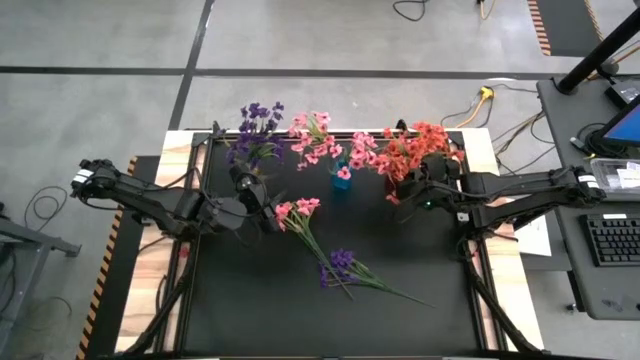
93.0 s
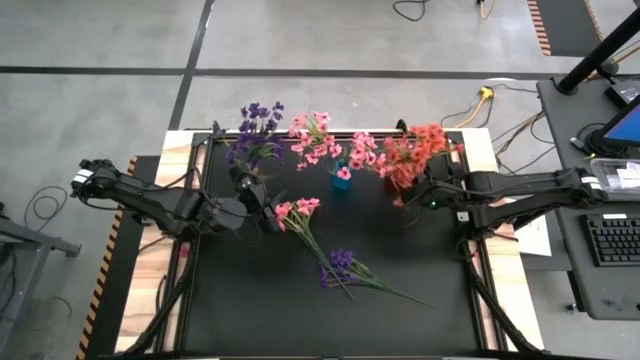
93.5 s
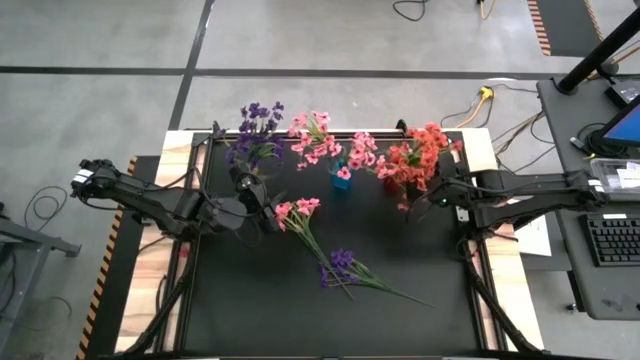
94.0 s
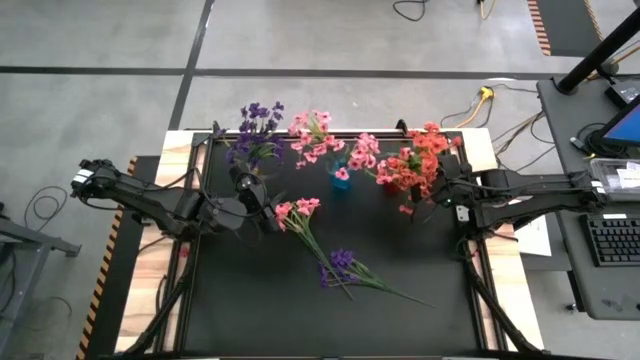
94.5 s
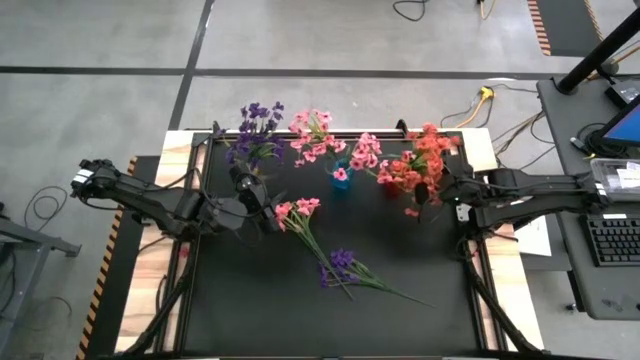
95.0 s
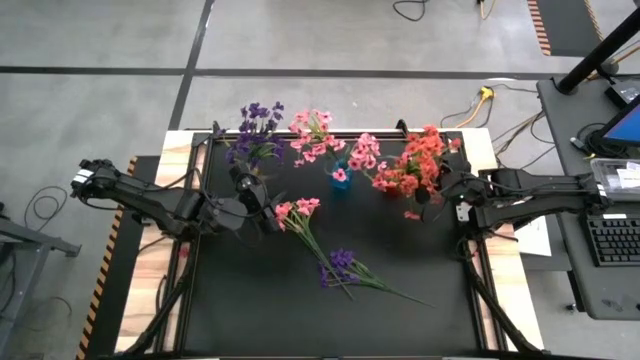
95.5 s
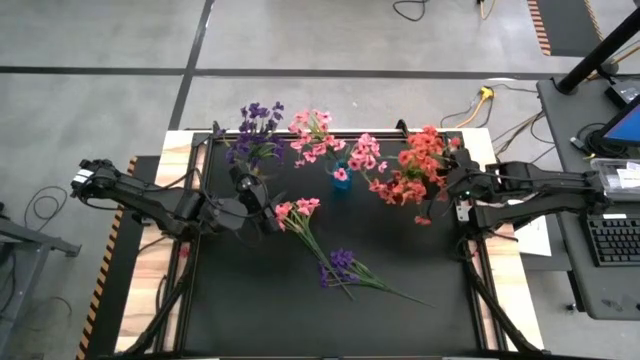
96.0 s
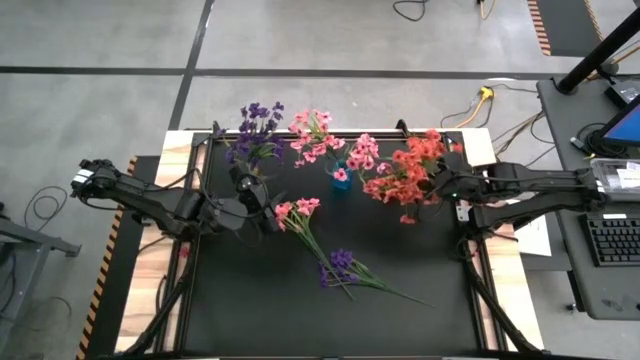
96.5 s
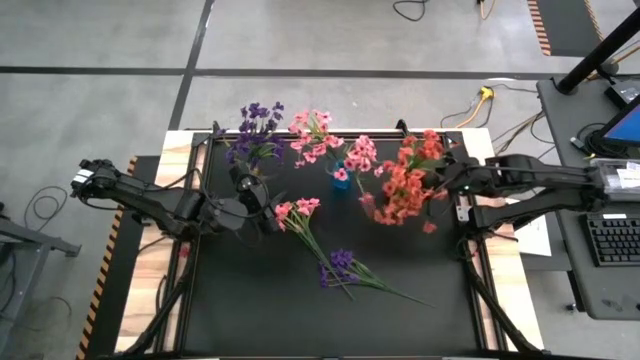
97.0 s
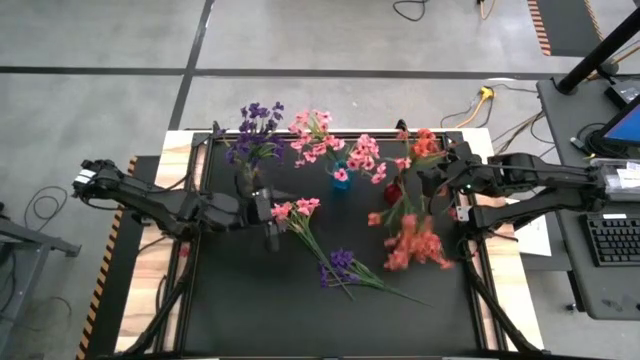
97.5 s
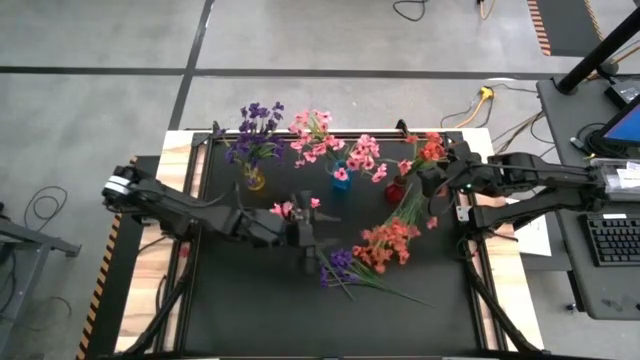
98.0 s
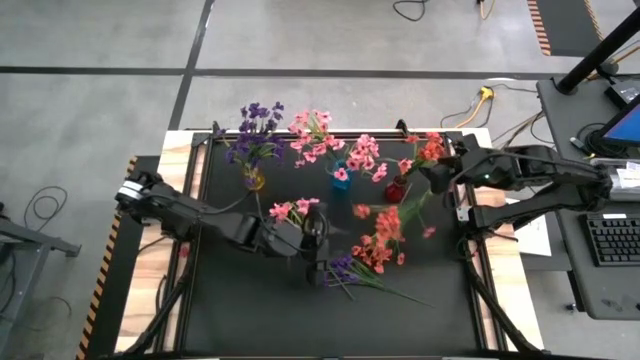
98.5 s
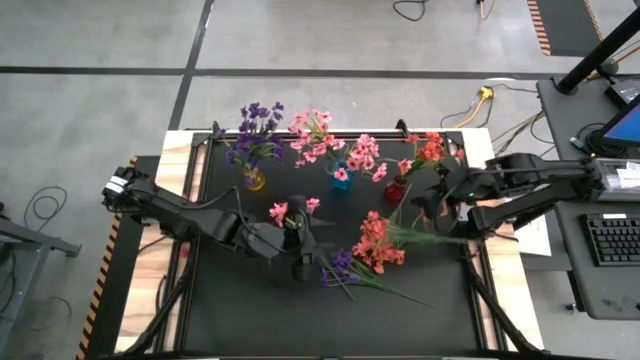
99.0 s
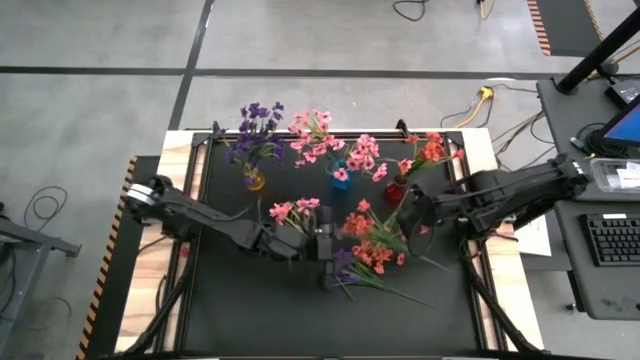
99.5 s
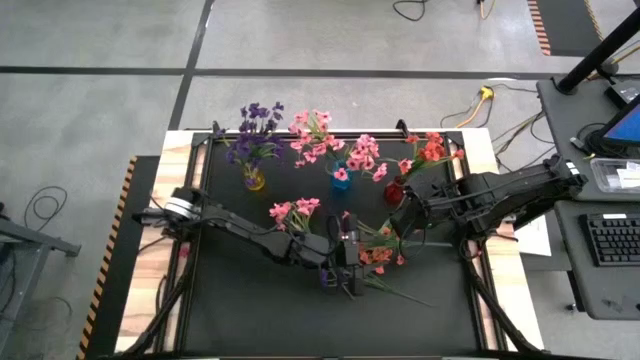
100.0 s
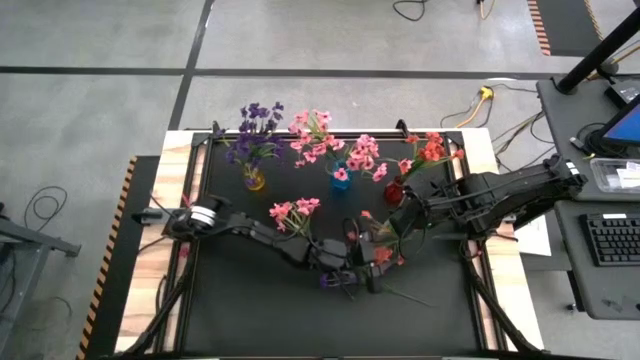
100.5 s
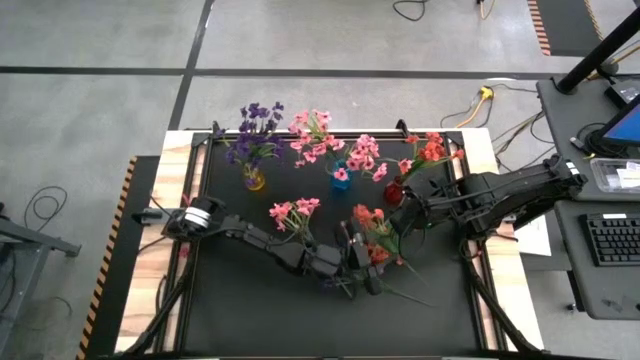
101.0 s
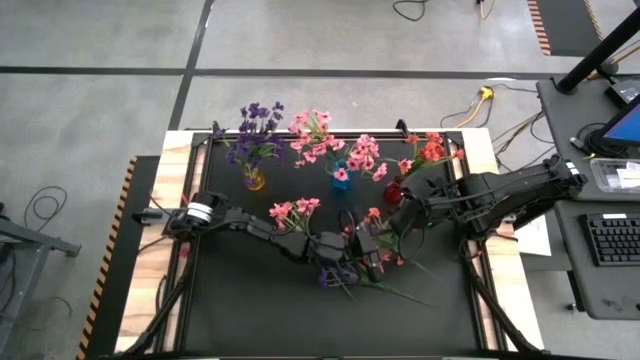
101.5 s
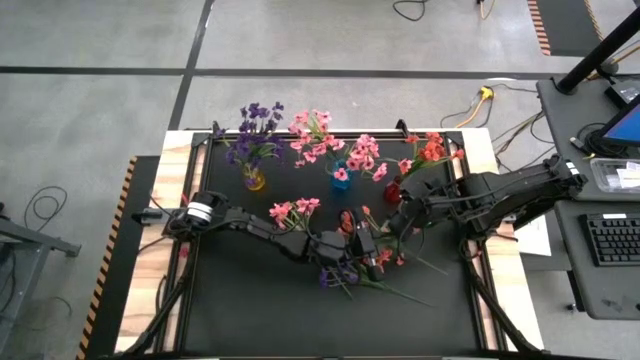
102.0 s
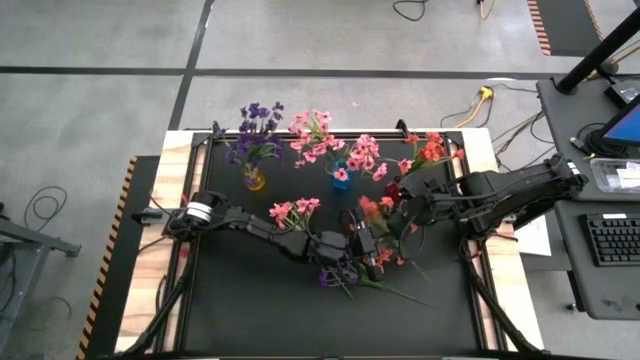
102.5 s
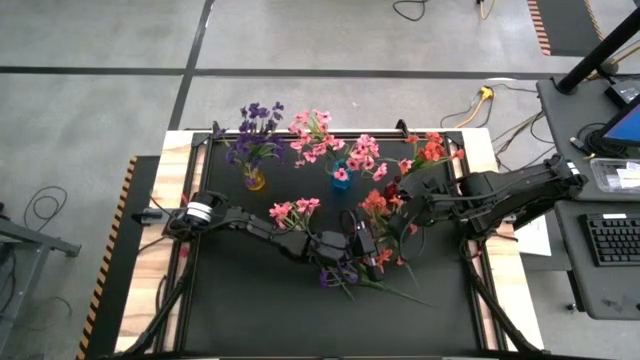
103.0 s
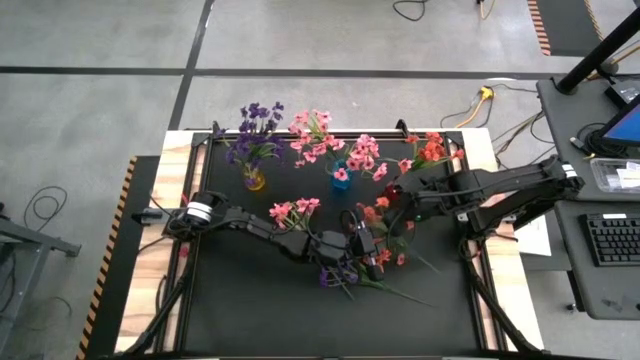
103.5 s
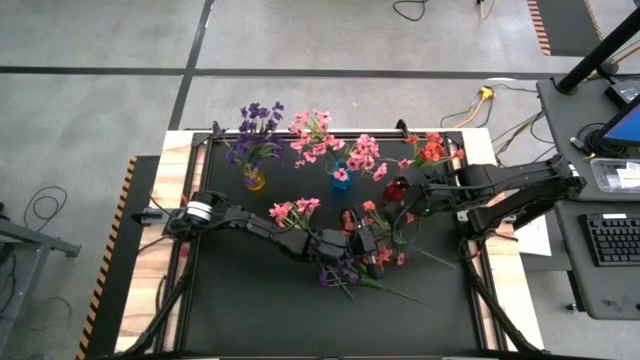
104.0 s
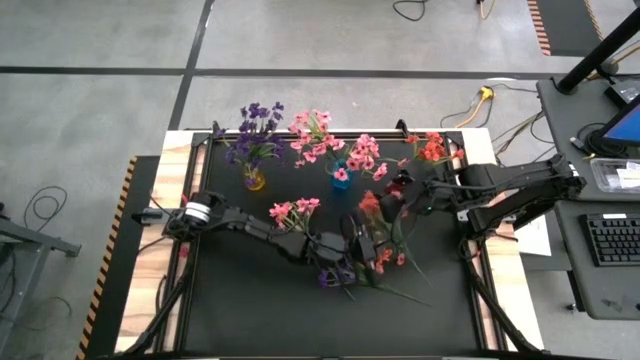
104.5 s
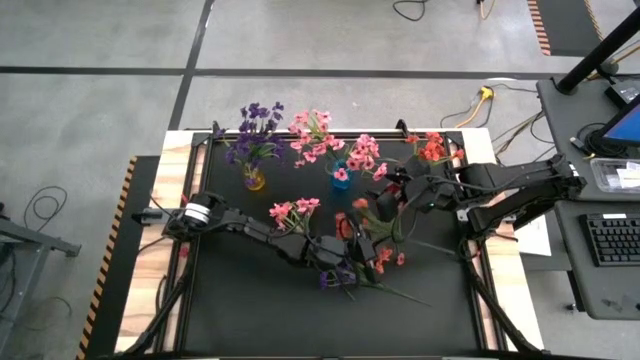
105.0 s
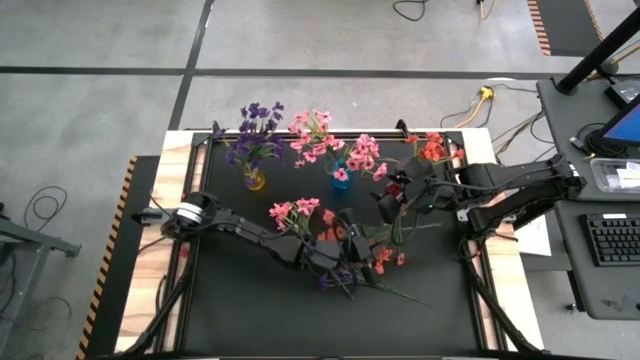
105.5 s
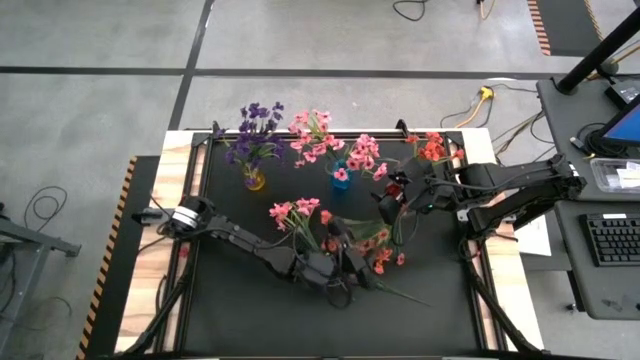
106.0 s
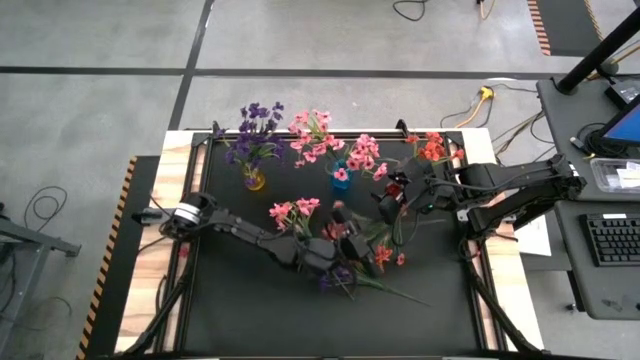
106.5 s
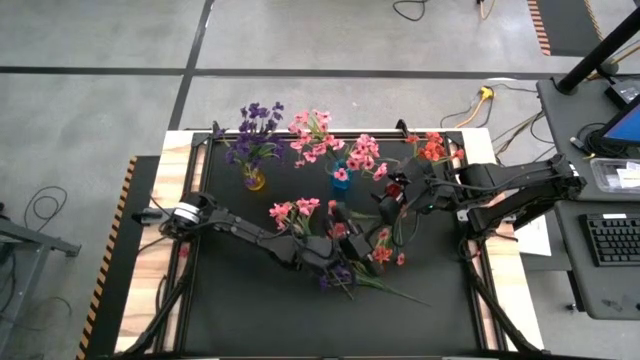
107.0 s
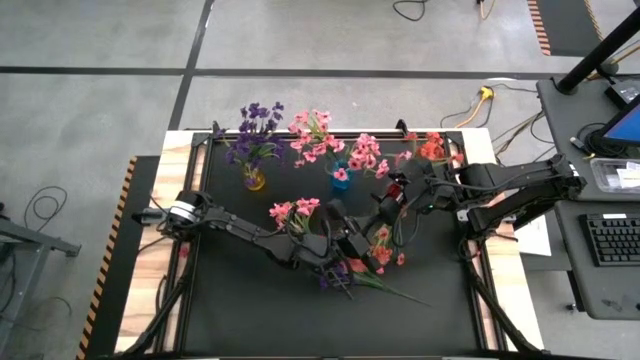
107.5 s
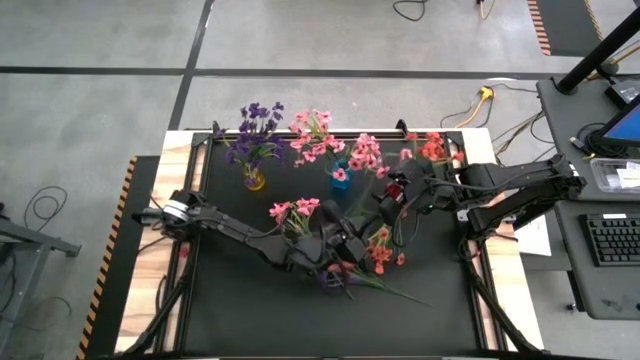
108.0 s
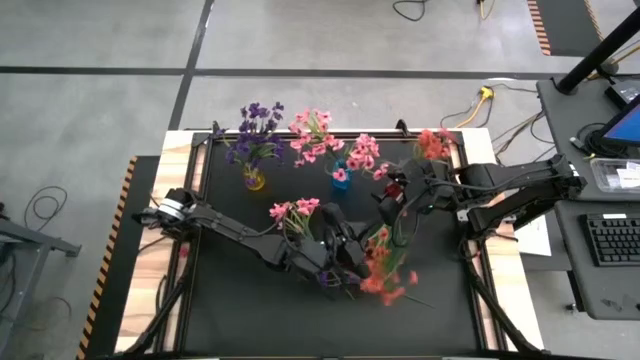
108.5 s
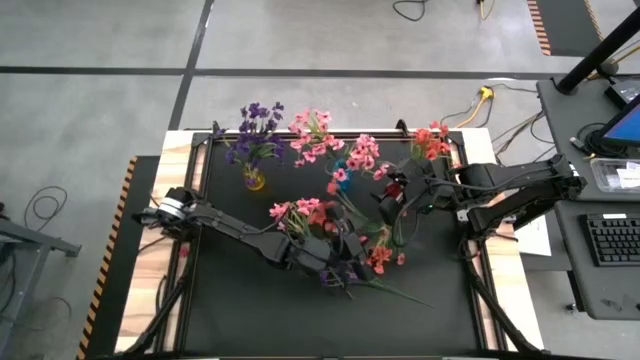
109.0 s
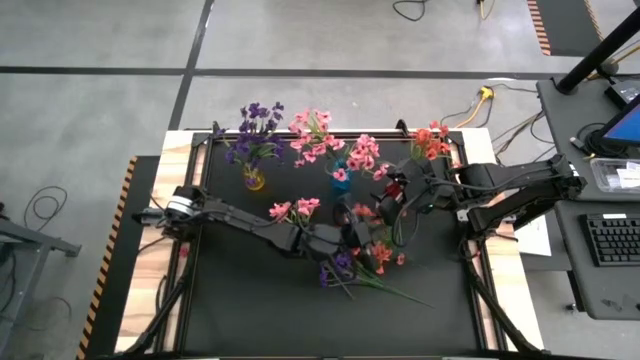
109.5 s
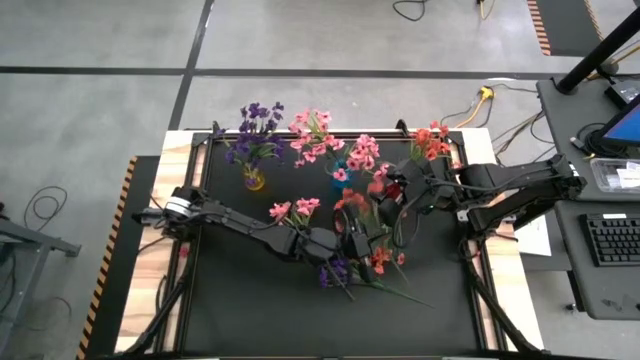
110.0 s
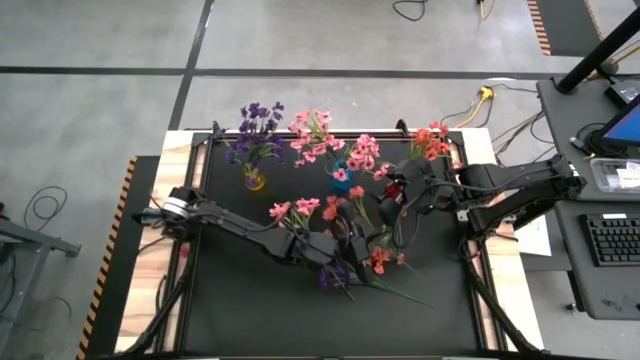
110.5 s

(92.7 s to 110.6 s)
Task: Sort flowers into vase by color
Put the orange flower into the red vase

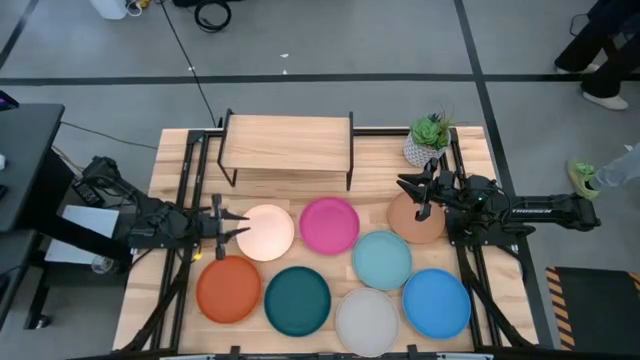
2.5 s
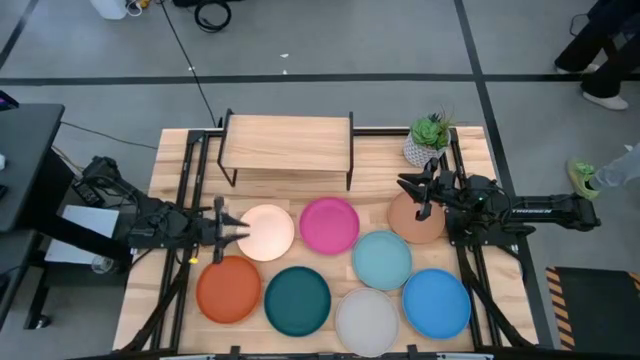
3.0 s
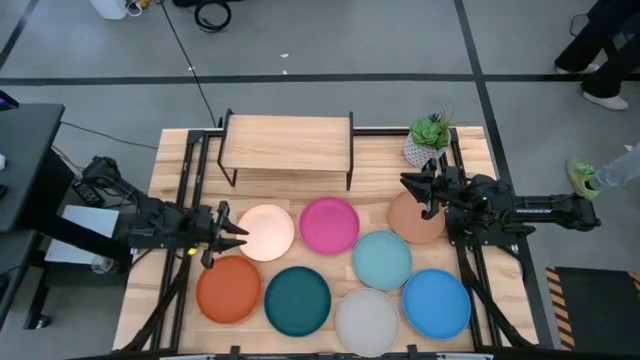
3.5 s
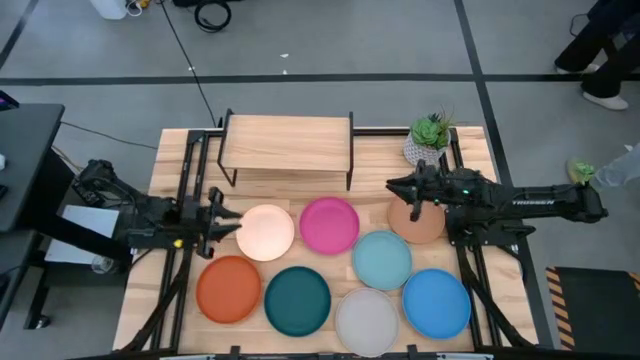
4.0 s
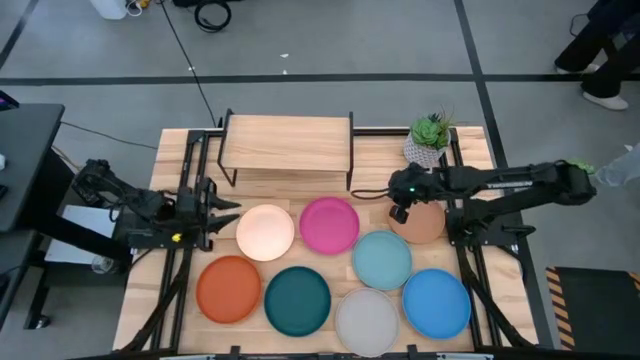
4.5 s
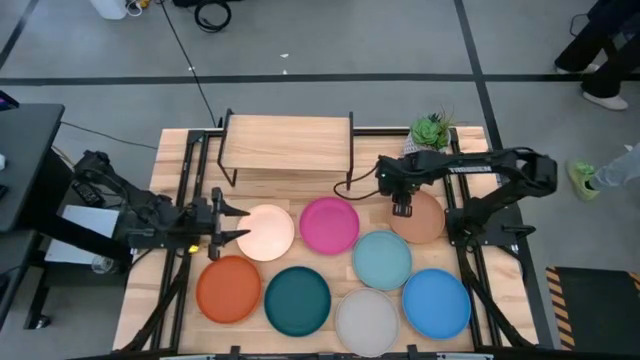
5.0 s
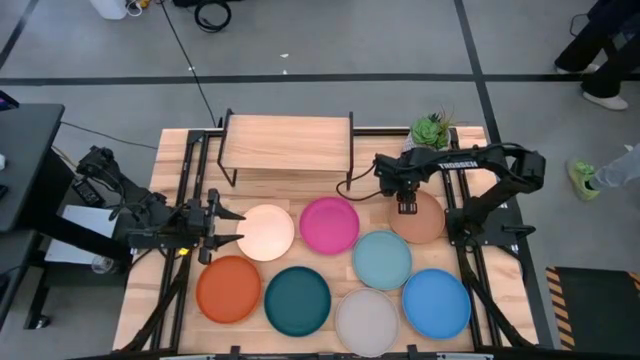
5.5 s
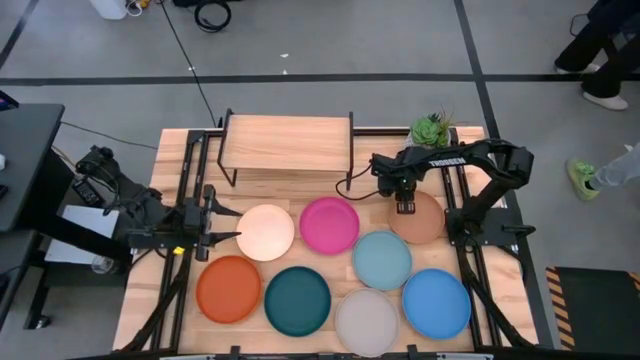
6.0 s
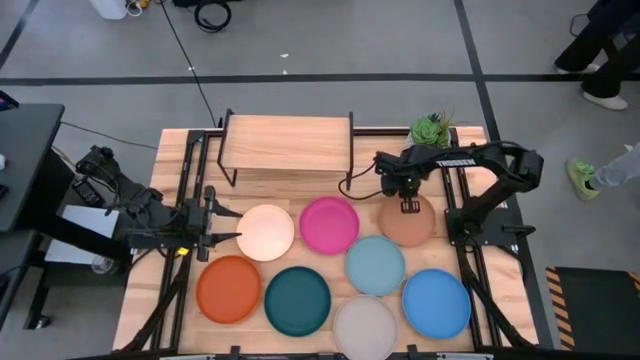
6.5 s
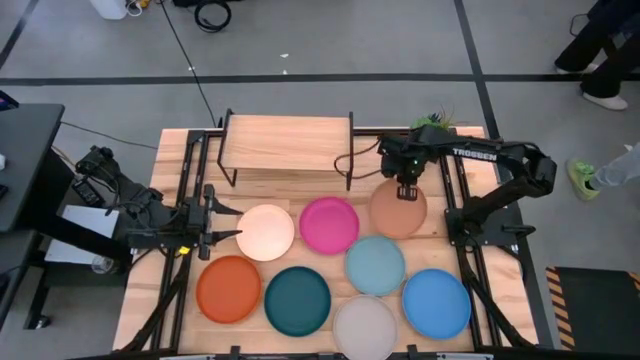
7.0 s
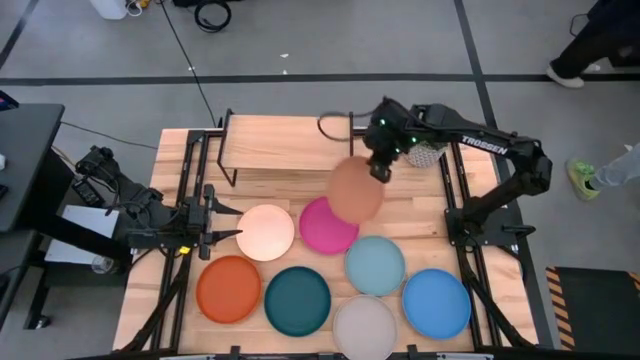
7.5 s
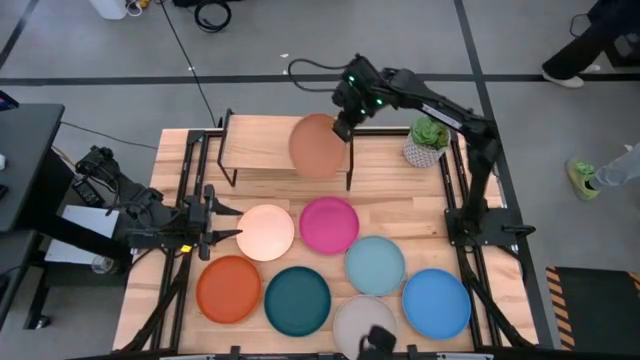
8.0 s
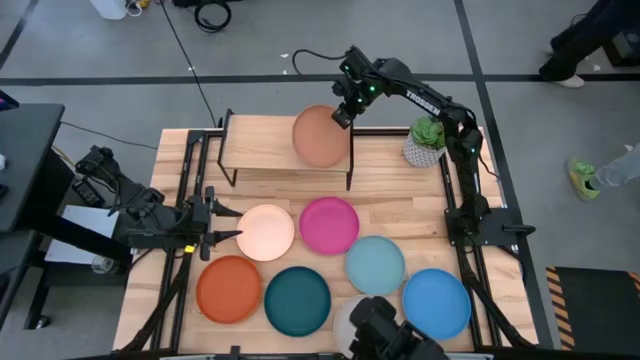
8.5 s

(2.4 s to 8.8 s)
Task: Place and stack plates onto a shelf
Put the brown plate on the shelf
